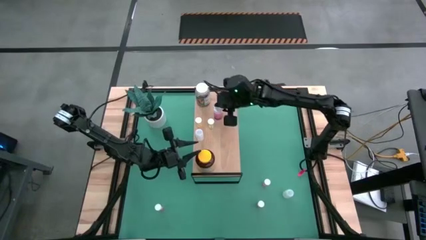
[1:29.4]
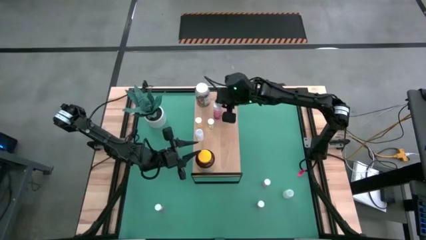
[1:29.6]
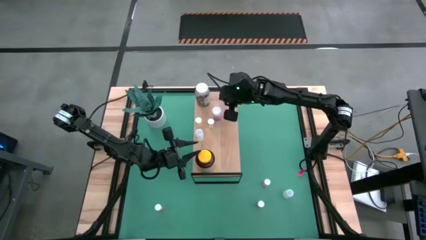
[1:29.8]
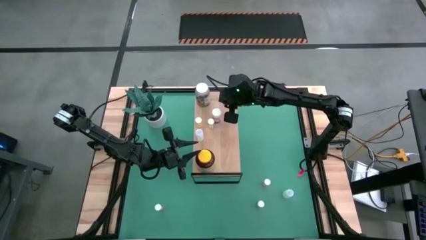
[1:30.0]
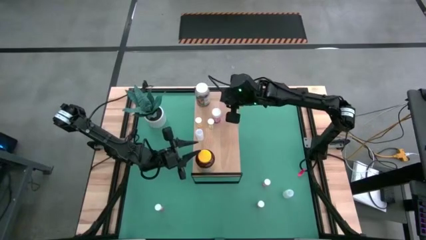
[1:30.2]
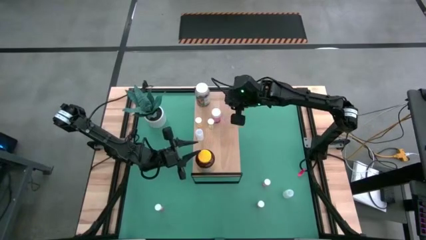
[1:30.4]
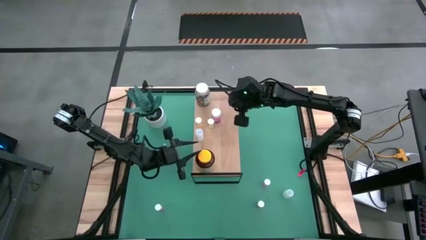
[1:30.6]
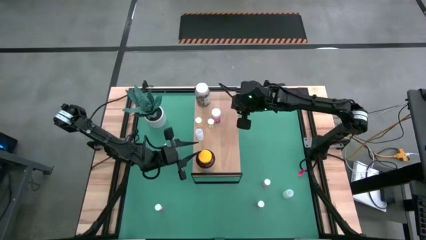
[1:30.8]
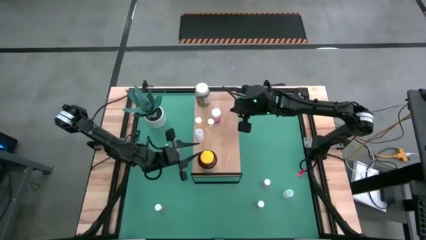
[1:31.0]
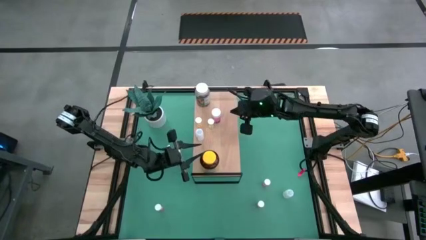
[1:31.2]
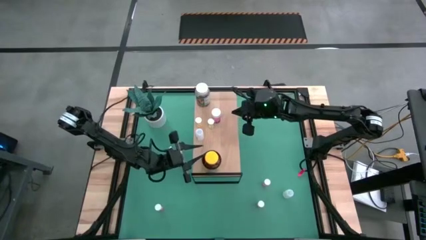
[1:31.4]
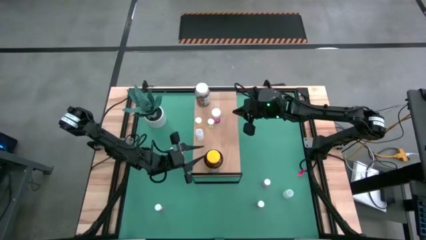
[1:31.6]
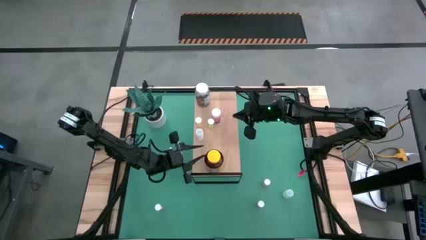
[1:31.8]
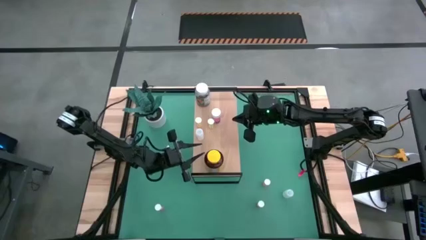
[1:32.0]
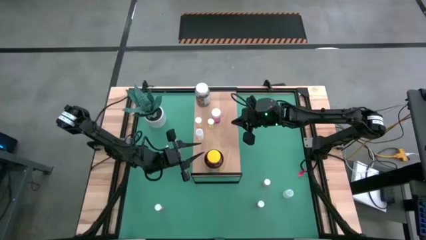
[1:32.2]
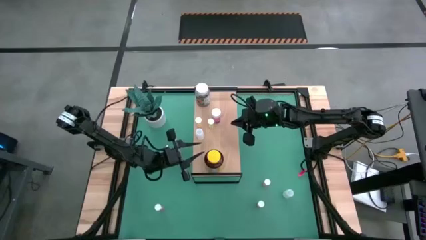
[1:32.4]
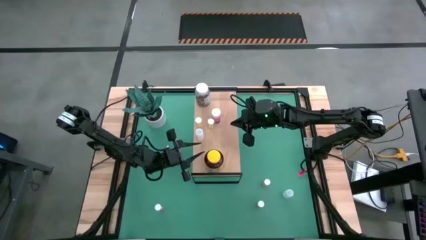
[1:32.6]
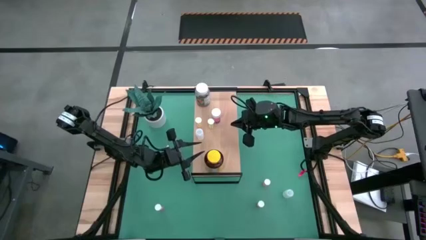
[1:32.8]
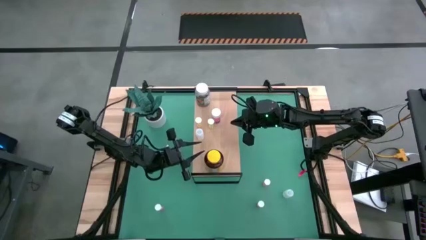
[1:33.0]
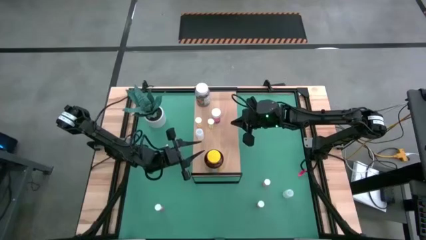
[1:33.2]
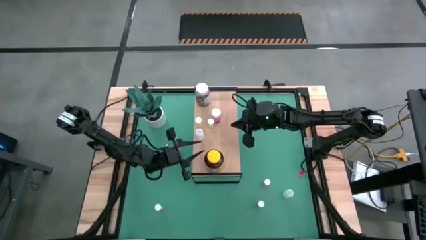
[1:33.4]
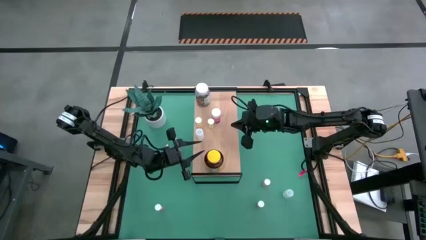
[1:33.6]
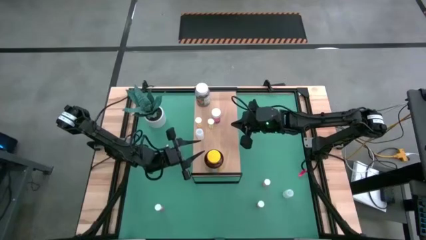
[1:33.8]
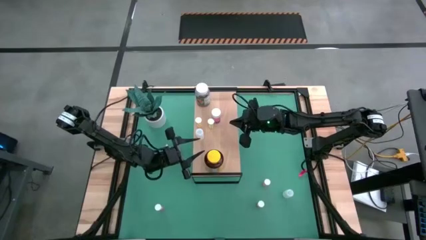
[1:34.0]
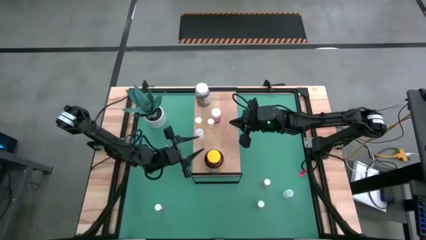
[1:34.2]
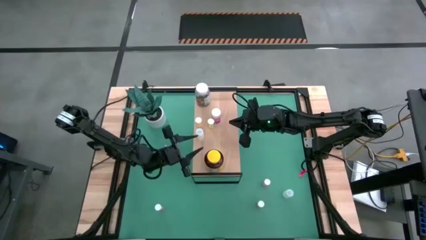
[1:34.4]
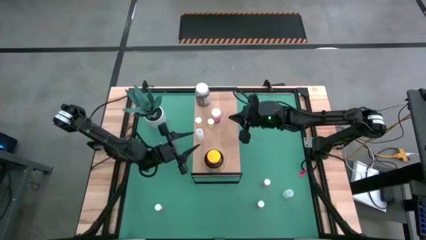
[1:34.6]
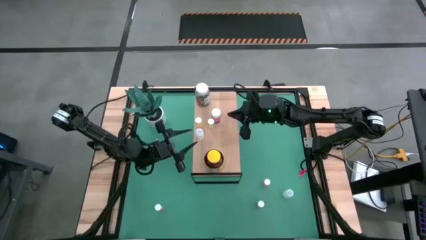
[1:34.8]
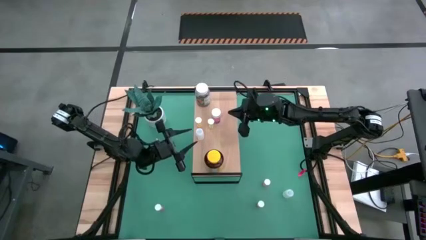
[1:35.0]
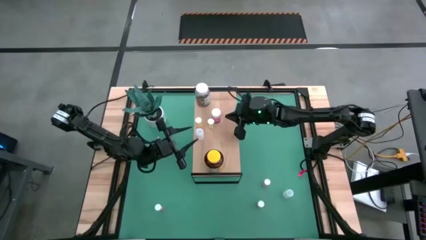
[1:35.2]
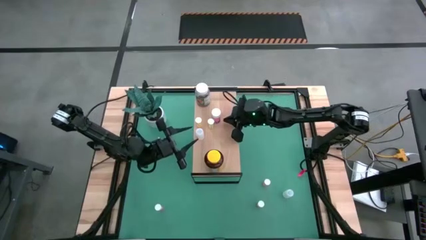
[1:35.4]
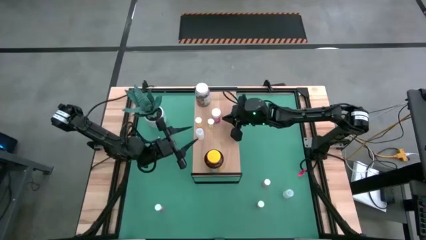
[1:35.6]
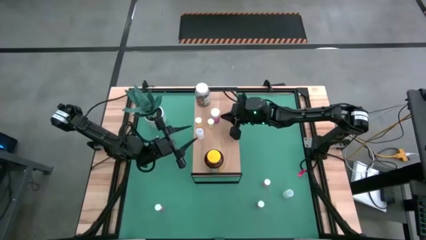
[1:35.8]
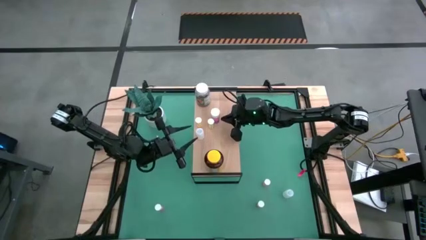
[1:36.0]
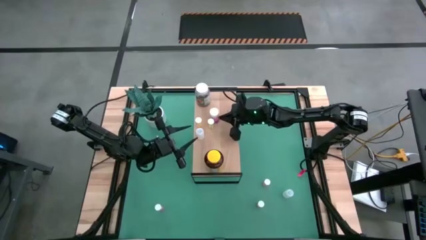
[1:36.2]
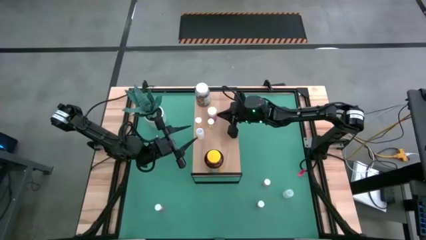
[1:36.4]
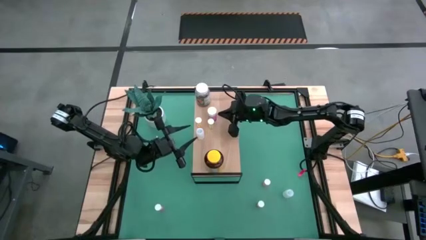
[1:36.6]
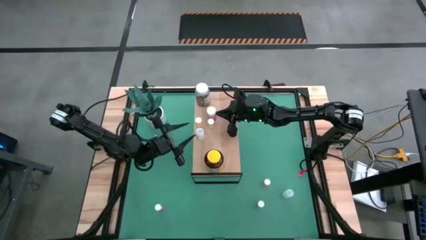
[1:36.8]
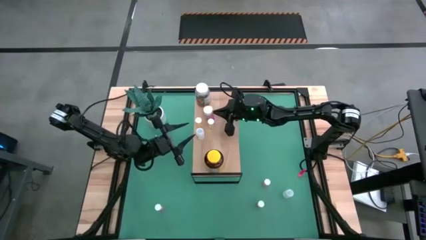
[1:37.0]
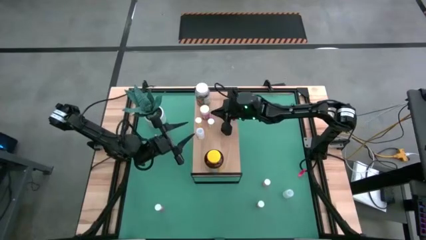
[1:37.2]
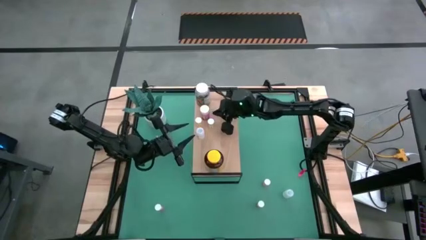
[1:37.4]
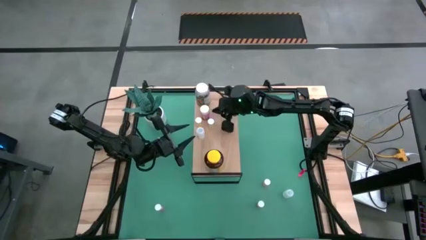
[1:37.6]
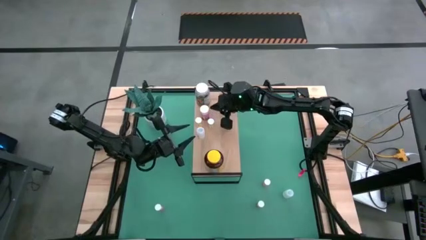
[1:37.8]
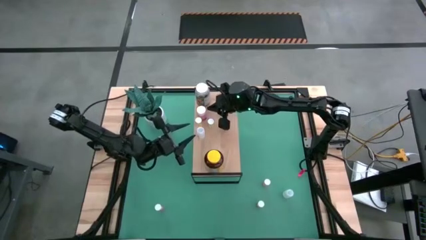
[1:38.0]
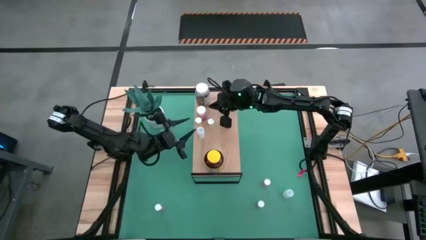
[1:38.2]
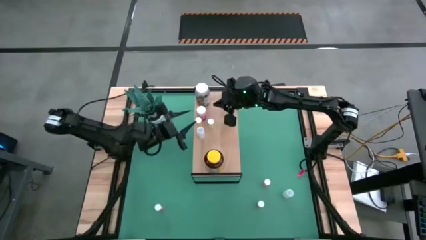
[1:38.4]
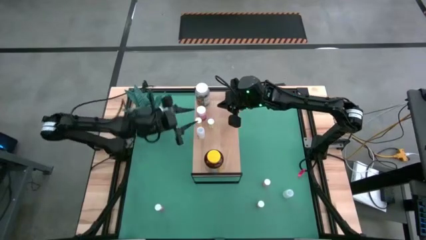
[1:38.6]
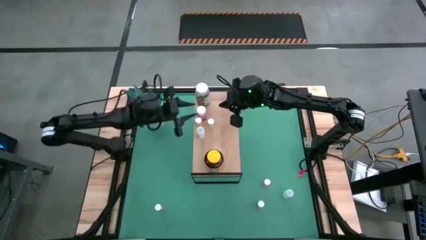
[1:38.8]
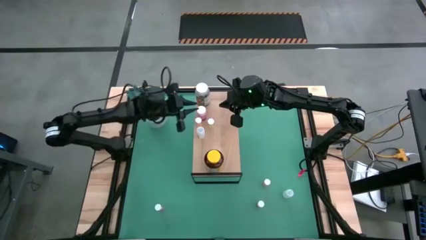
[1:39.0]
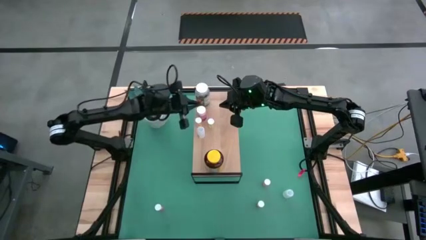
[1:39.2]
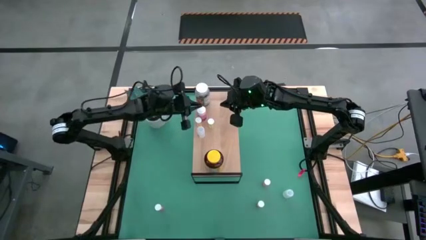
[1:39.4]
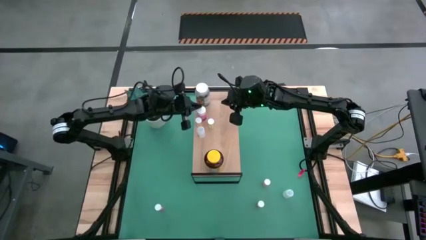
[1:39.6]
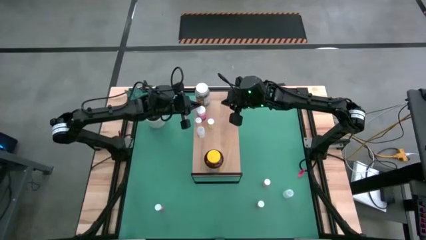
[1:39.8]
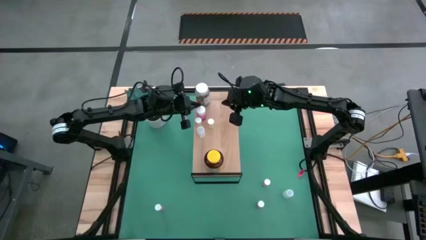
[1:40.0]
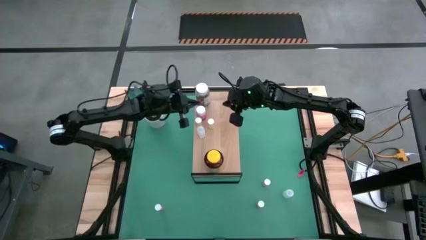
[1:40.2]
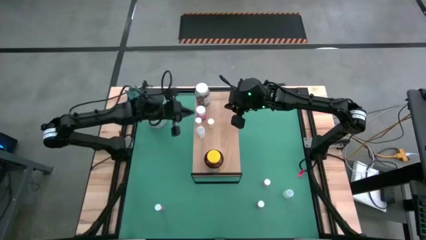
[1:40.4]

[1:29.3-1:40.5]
Task: Pick and place medicine bottles onto shelf by color
Put the pink pill bottle on the shelf

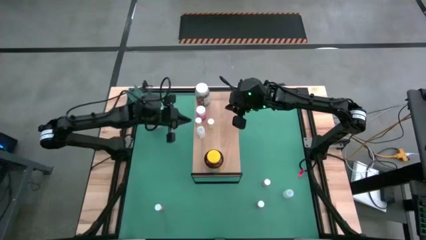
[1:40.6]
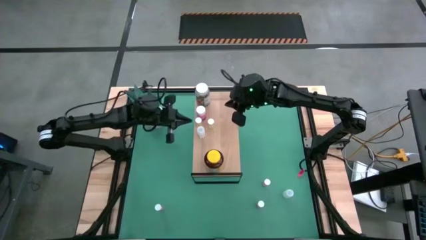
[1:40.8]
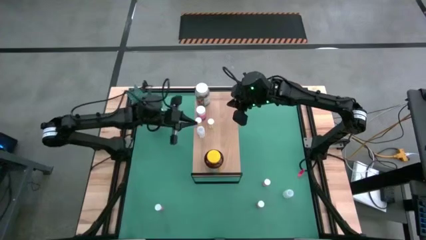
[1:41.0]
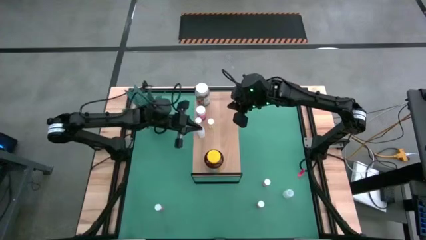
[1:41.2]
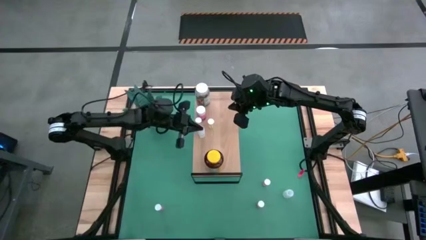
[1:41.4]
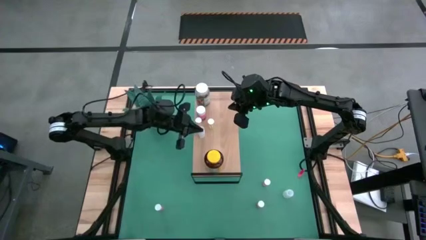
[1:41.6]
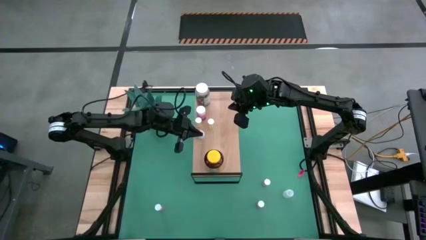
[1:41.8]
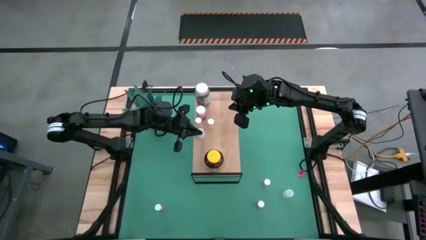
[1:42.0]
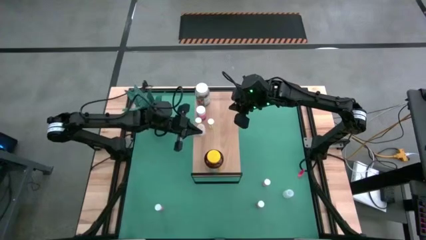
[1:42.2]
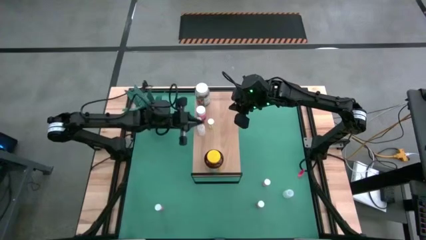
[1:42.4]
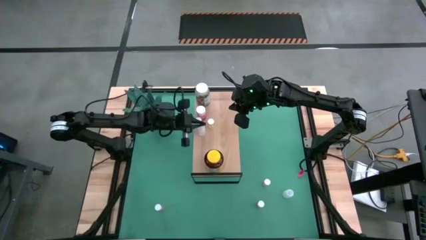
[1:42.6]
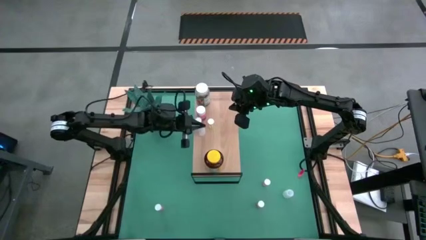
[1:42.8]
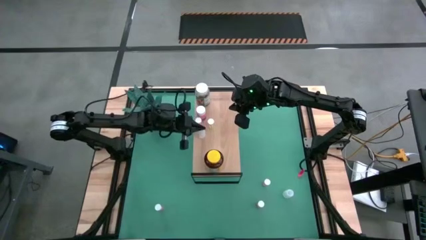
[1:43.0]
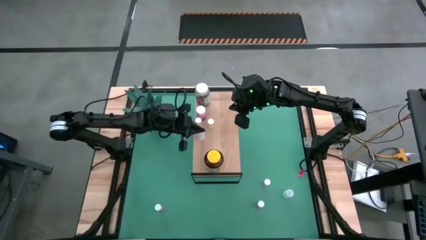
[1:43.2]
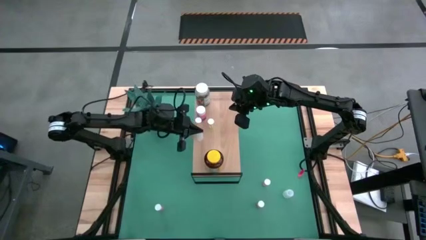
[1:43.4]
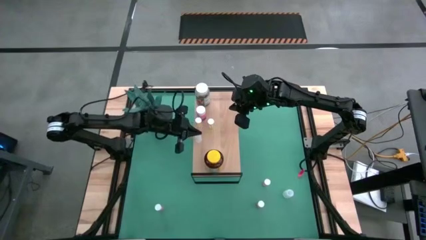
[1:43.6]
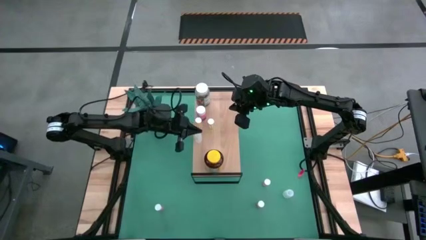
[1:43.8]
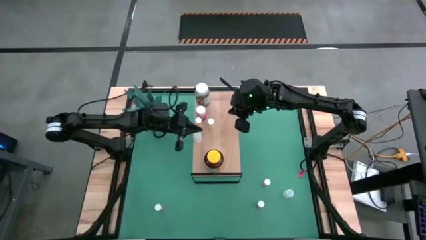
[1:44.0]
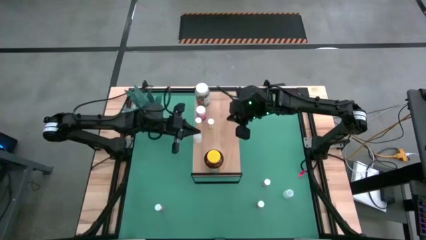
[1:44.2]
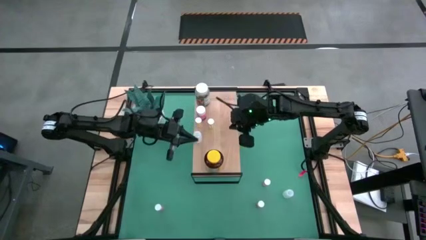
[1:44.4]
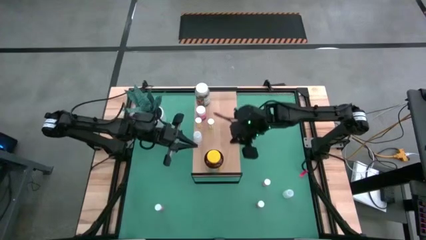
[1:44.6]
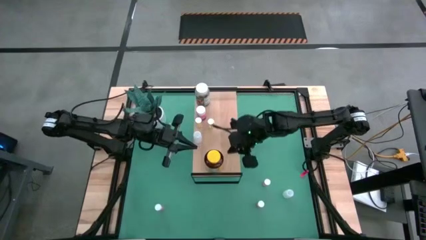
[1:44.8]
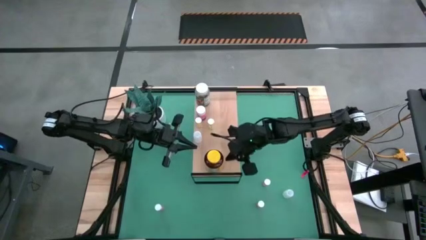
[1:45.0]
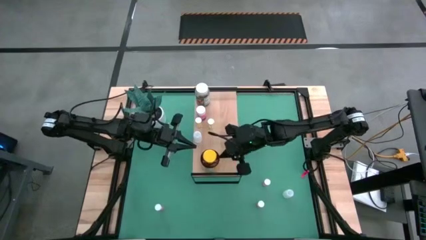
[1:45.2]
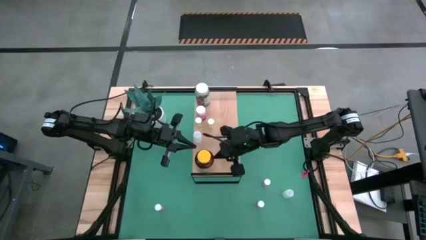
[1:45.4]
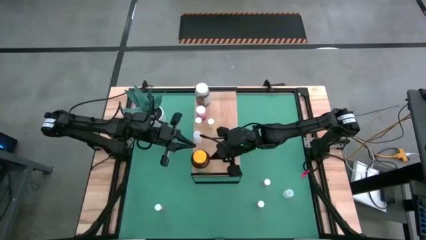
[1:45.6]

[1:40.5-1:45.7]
Adjust the pill bottles on the shelf

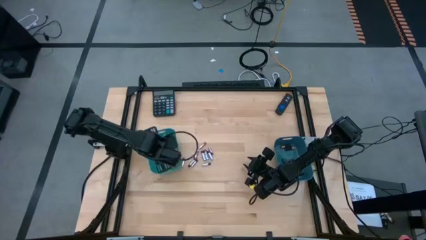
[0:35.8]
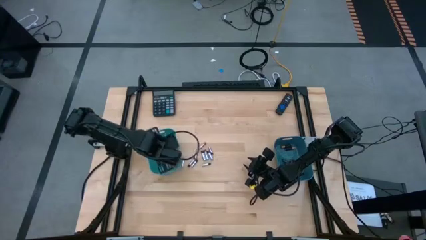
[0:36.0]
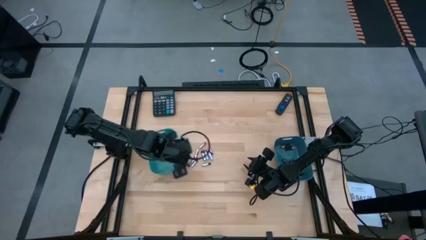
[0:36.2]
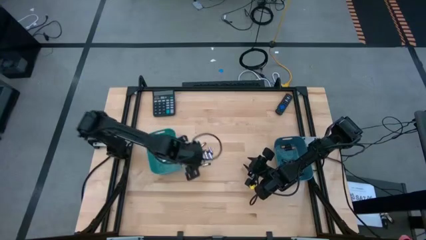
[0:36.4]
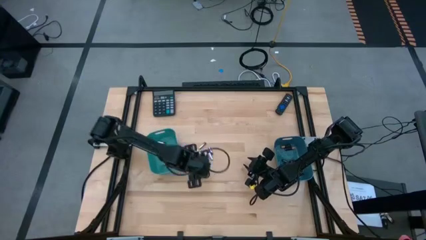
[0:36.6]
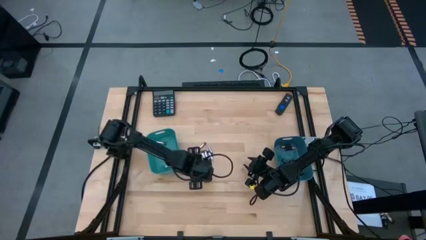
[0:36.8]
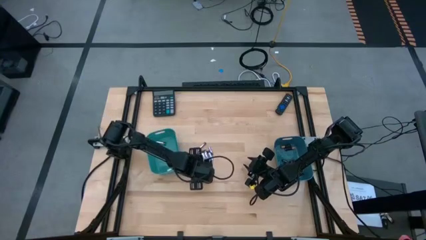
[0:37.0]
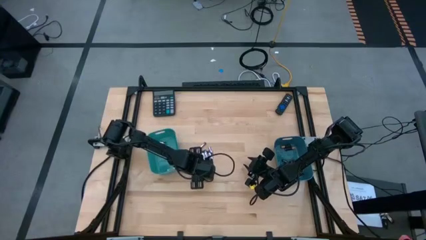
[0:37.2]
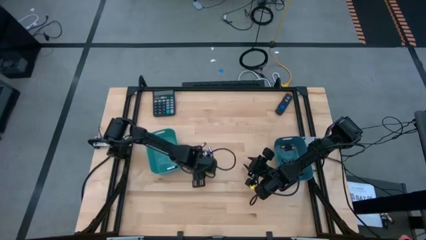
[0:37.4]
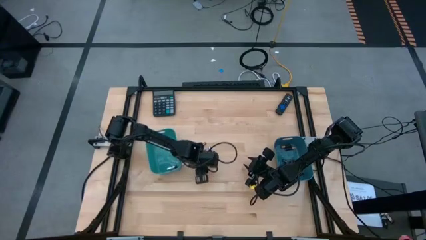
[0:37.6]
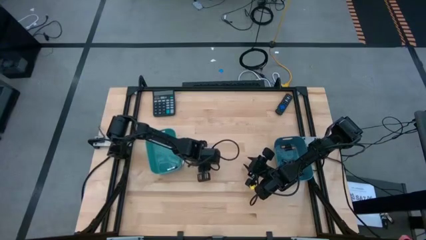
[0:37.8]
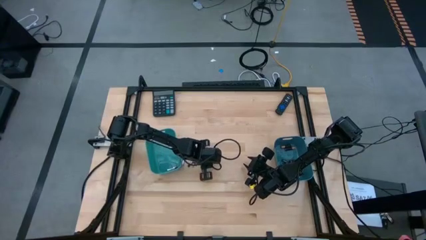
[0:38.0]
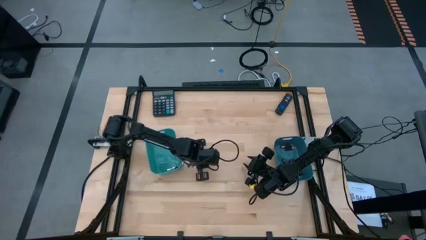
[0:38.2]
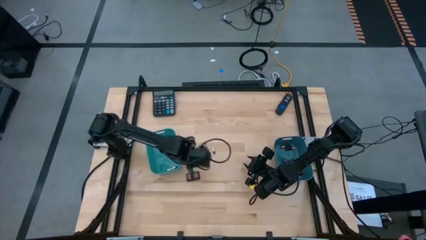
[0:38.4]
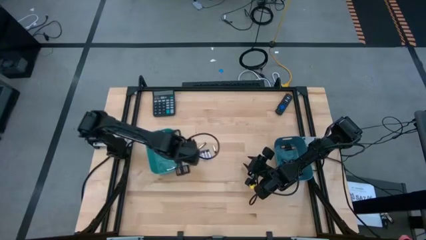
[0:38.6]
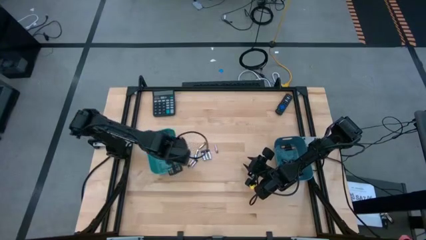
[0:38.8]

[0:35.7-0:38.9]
Task: Sort batteries
Put the white battery into the left blue bin
